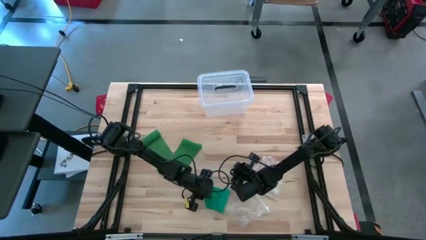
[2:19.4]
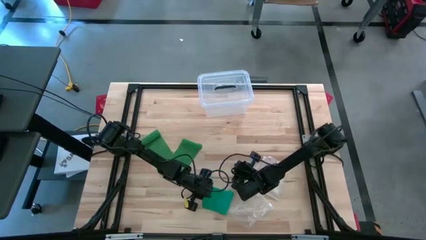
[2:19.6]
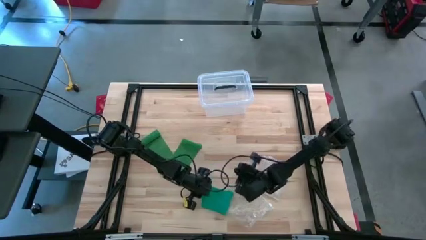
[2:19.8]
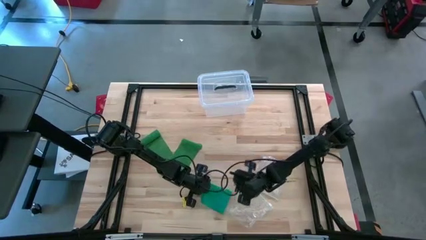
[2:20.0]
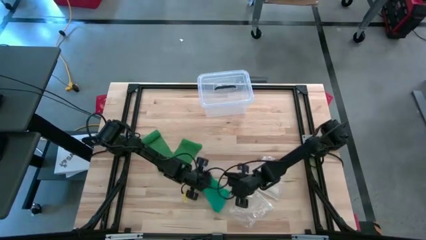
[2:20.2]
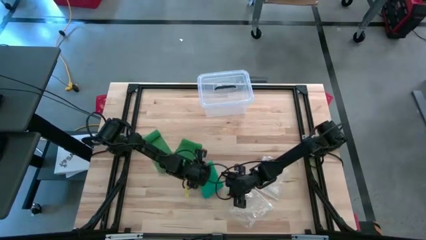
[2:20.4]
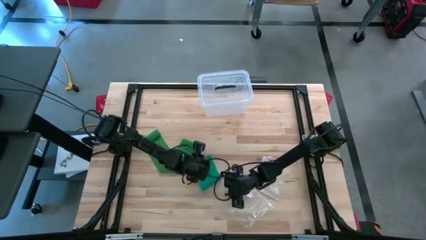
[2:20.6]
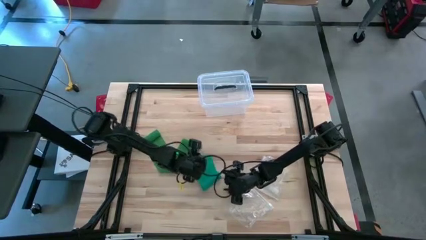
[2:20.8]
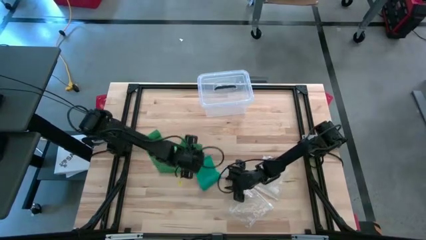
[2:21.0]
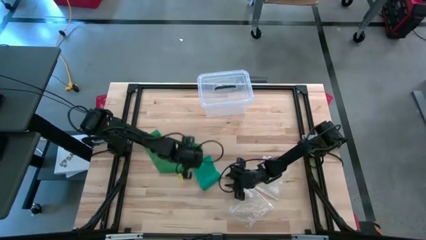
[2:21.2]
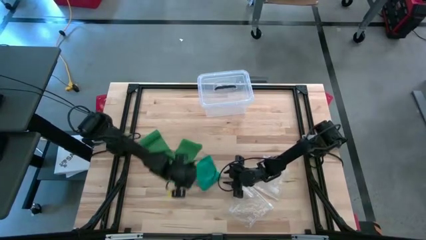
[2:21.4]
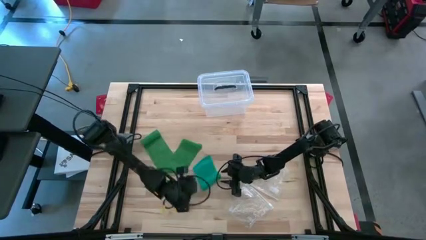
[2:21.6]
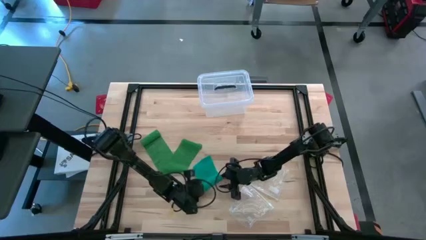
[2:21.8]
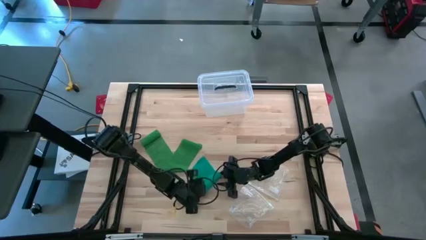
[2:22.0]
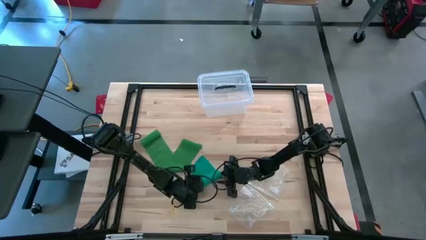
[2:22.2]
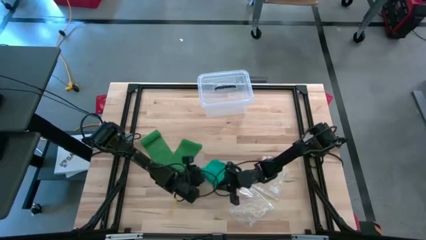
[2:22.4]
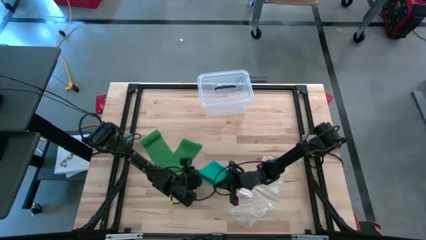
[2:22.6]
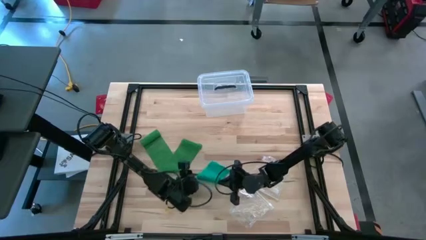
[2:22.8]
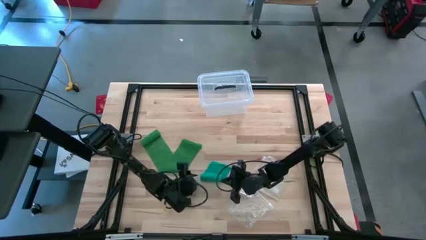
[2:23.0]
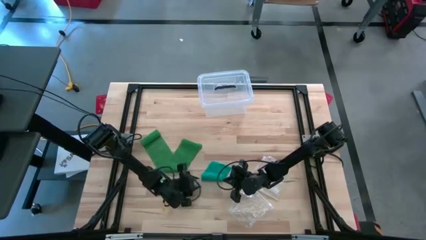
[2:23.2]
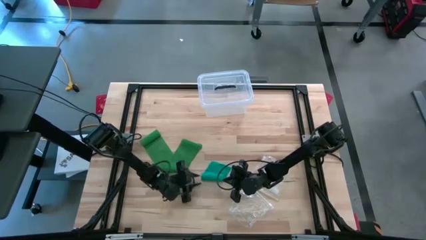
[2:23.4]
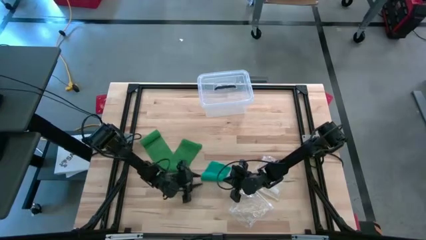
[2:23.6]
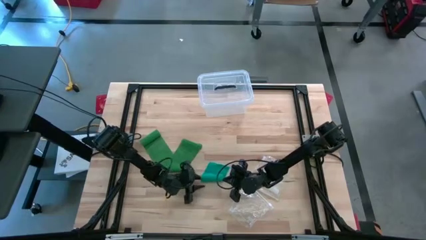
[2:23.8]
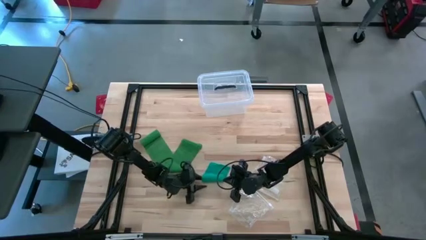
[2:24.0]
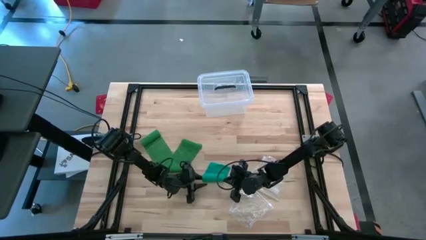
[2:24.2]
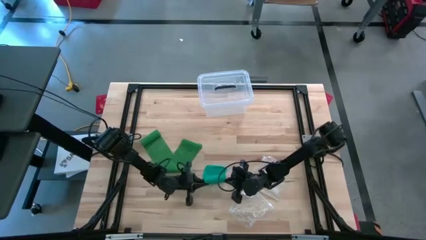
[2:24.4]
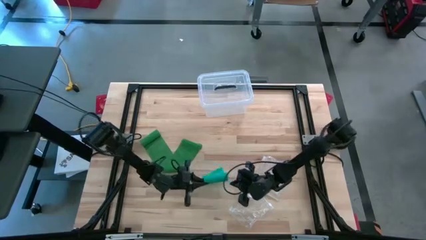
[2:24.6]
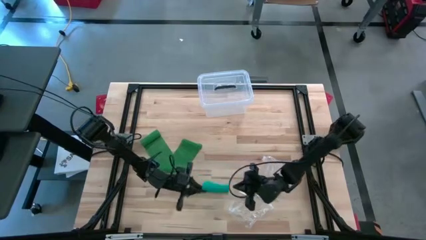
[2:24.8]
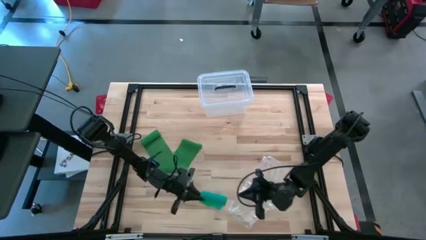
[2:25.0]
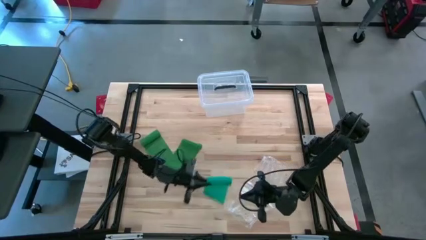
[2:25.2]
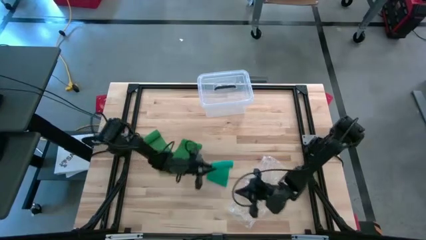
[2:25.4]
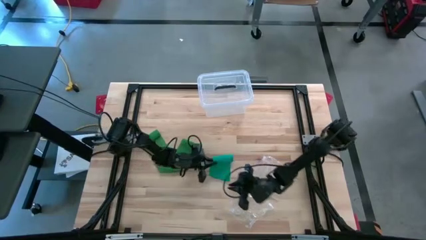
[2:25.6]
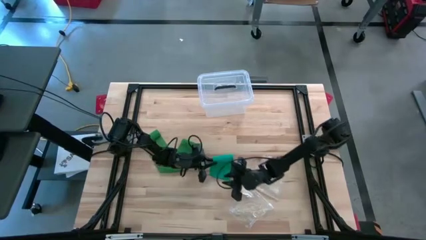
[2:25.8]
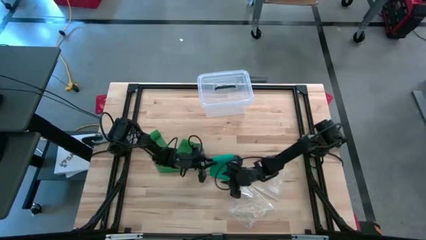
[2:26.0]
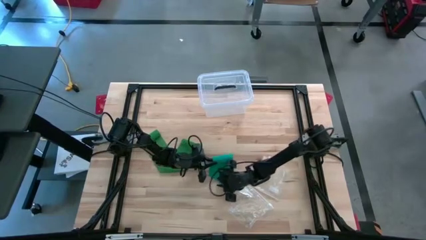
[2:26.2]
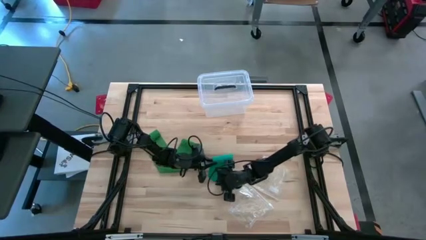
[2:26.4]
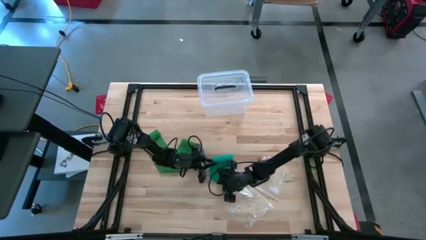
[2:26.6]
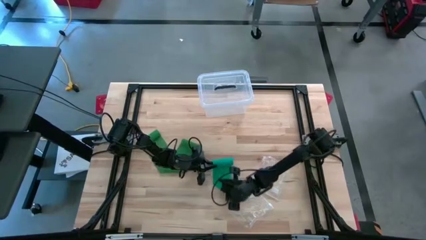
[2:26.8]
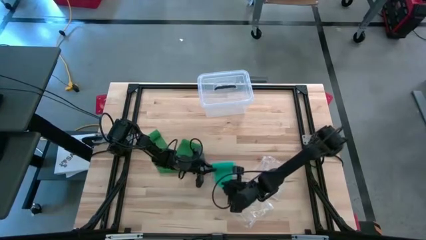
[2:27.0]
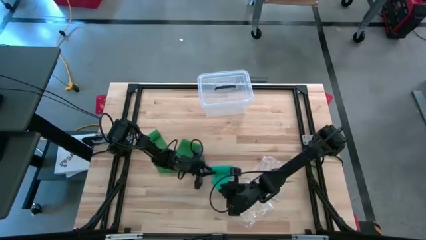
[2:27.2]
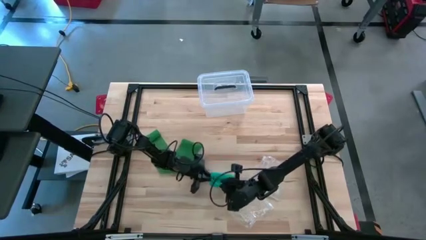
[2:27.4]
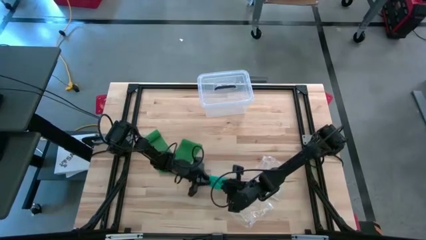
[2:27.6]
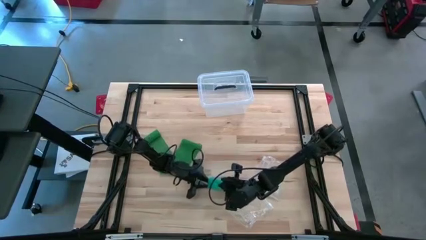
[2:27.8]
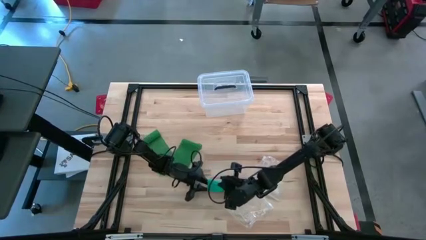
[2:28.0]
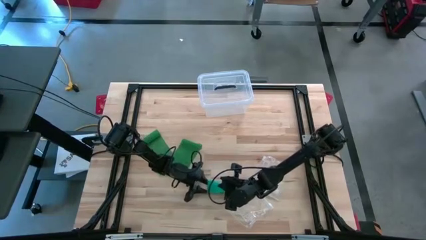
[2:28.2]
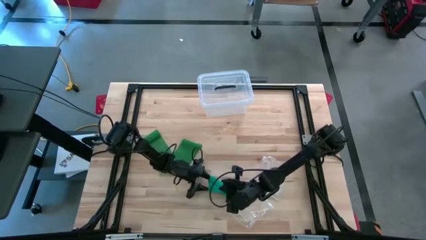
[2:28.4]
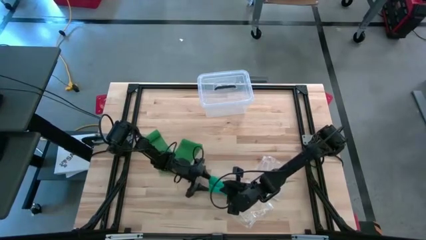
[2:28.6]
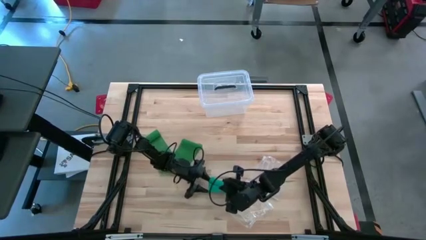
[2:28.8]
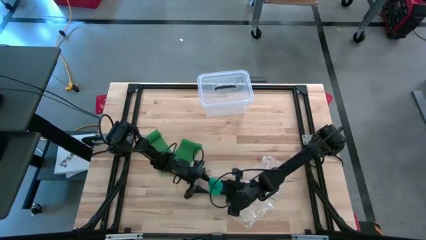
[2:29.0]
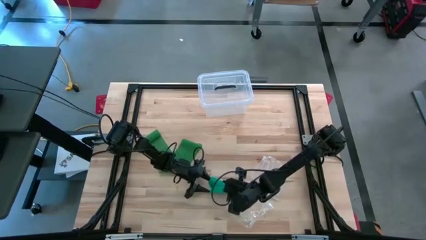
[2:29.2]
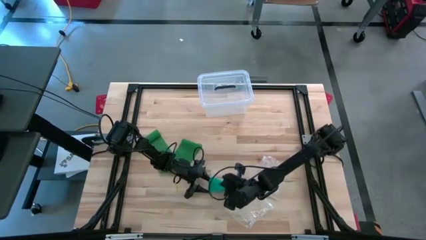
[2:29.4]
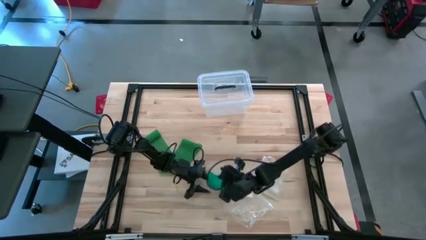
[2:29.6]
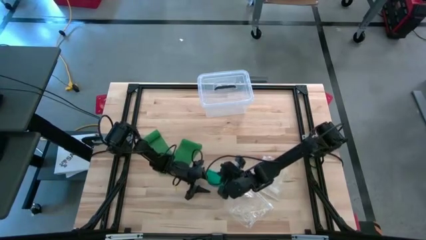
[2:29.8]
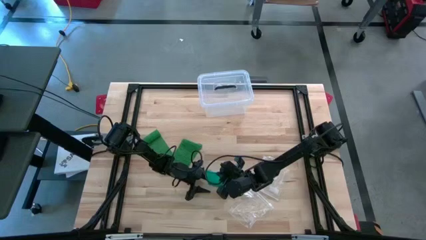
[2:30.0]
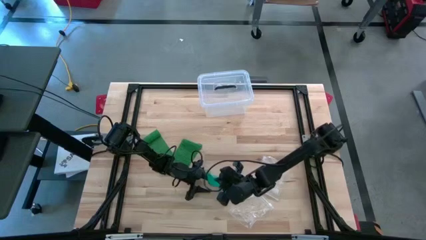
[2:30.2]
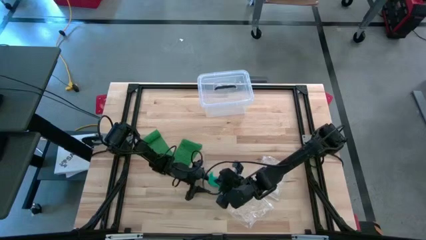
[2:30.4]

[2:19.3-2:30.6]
Task: Roll bandage
Roll the blue bandage

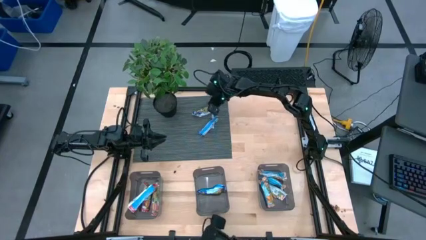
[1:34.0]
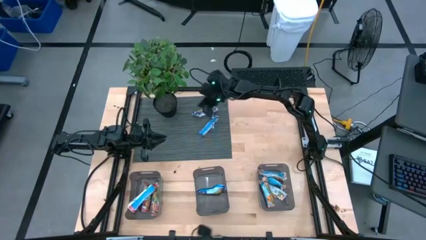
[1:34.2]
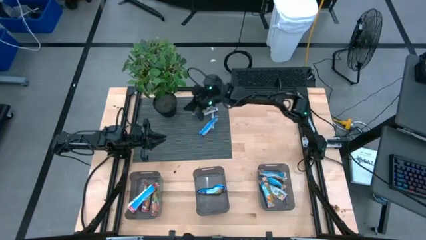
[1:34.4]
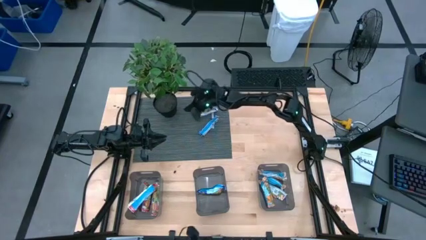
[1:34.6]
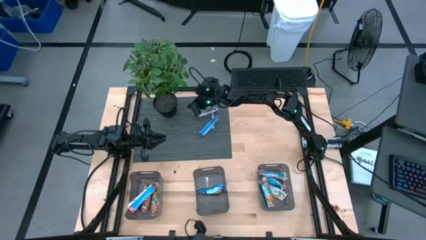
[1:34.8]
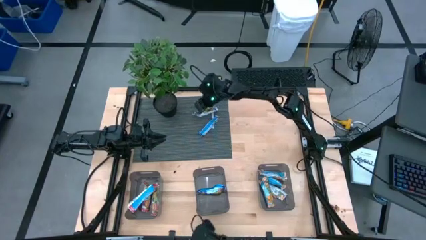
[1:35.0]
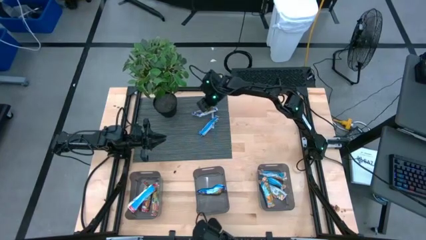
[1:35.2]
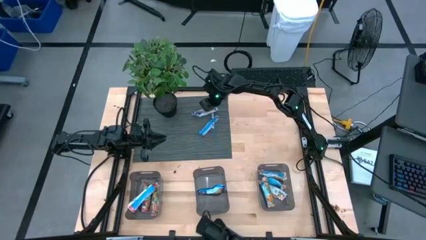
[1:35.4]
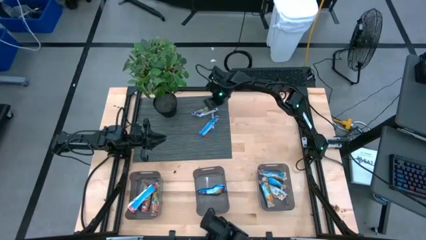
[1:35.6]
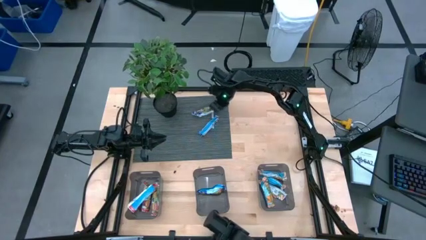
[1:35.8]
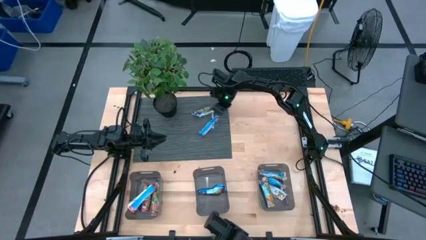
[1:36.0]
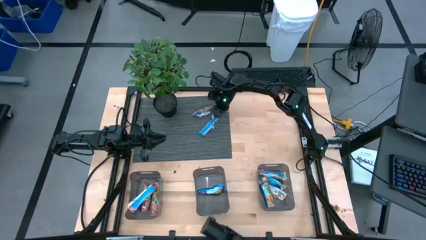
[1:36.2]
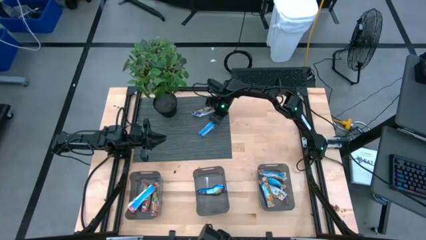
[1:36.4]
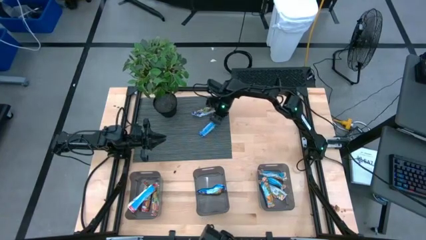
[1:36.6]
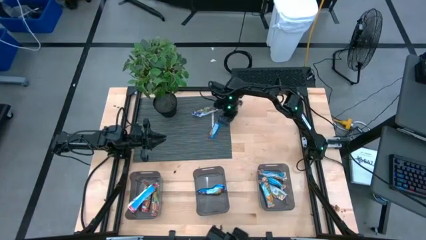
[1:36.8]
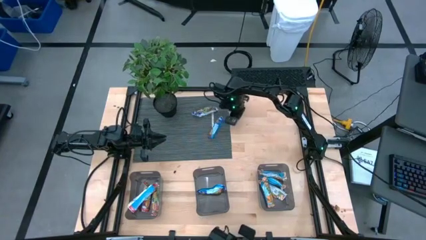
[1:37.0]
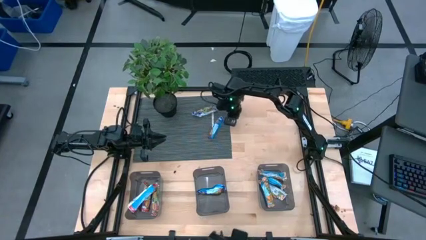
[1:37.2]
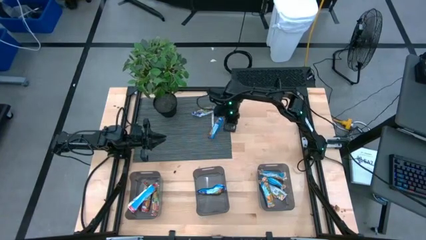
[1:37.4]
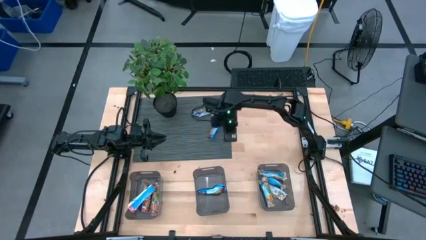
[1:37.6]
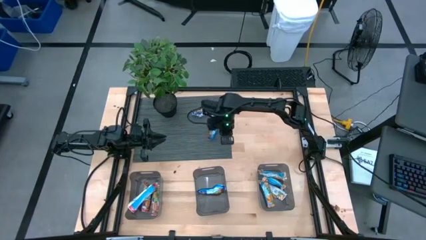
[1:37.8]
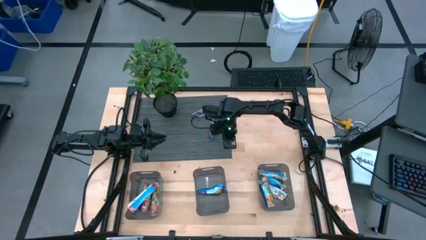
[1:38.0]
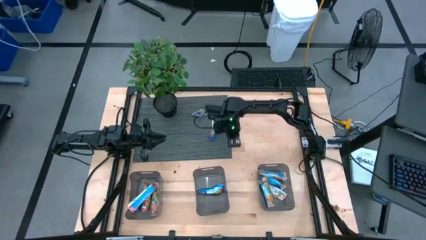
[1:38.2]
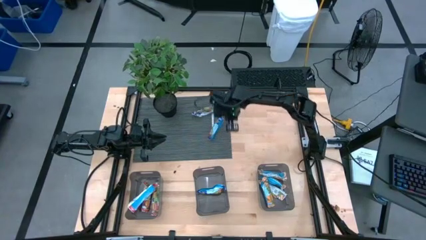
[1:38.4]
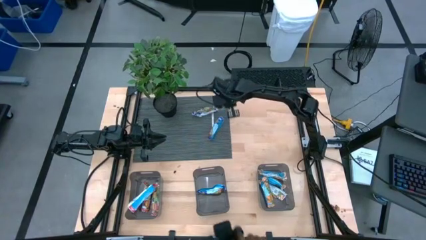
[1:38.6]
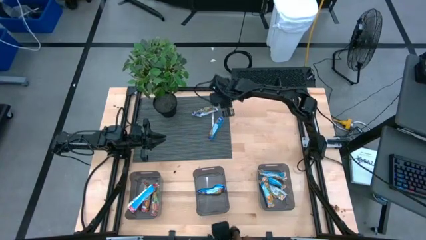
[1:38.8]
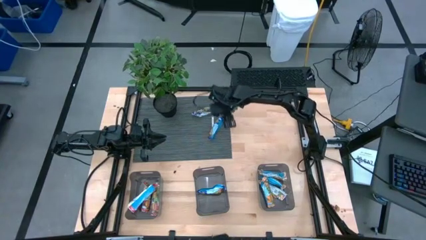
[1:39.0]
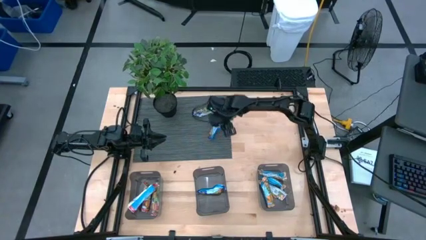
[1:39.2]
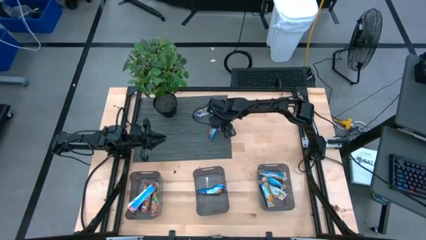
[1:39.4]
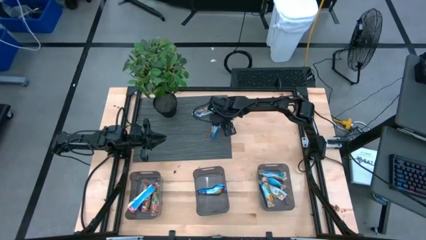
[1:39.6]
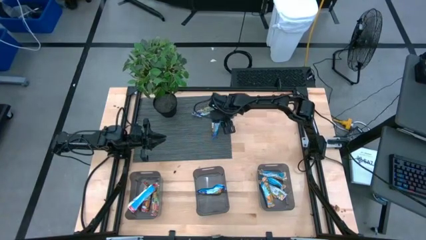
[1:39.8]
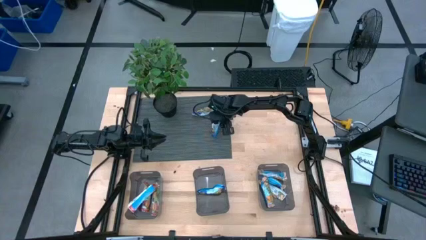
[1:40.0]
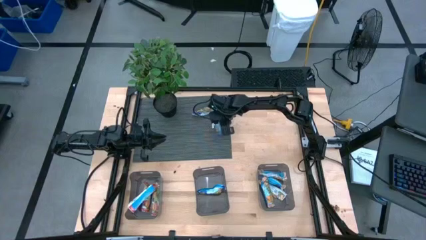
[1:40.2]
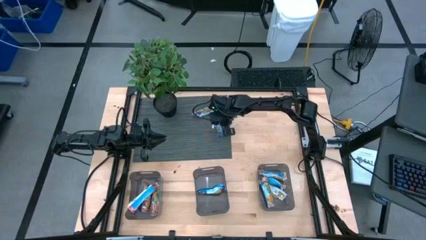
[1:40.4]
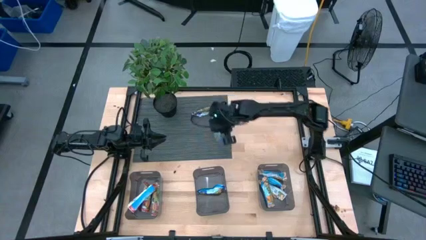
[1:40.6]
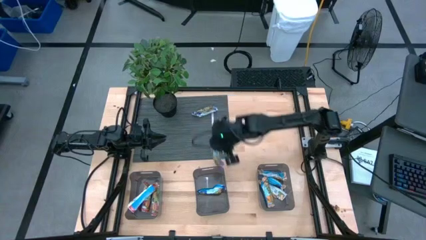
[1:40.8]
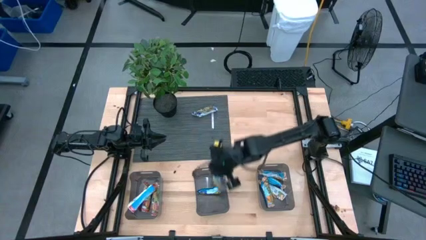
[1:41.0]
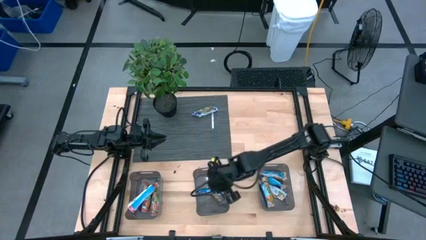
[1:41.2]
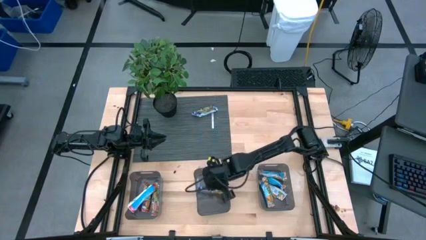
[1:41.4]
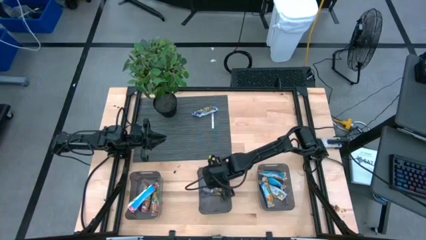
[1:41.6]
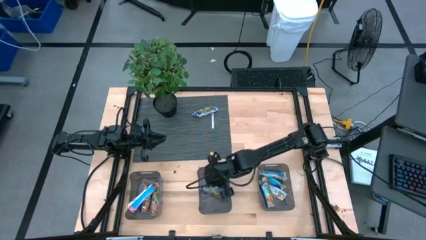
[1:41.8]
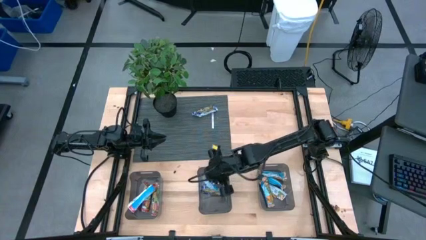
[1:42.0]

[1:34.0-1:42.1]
Task: Pick and place Granola Bars by type
Put the blue granola bar into the middle black bin
